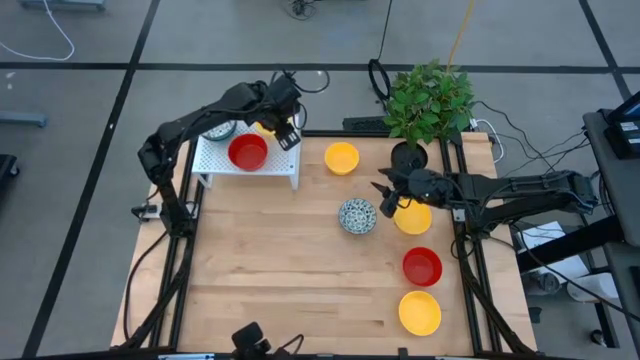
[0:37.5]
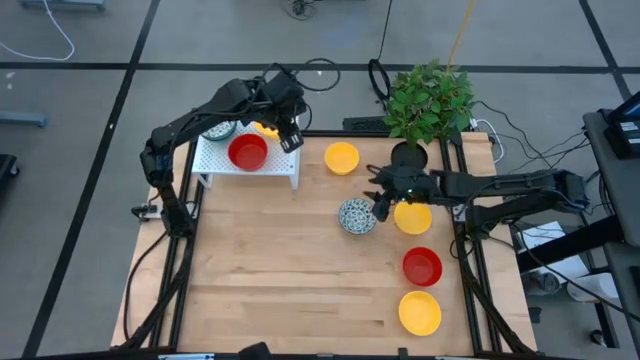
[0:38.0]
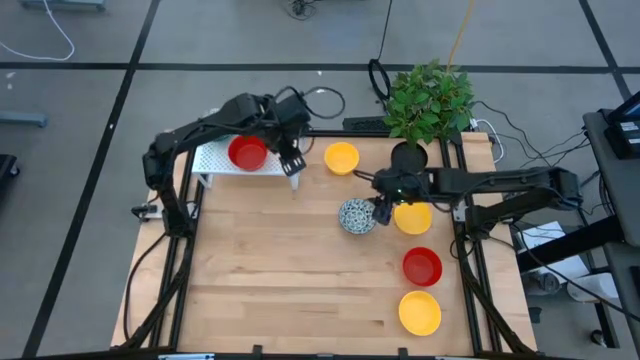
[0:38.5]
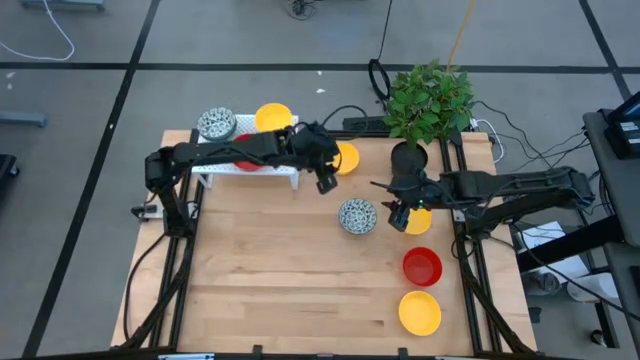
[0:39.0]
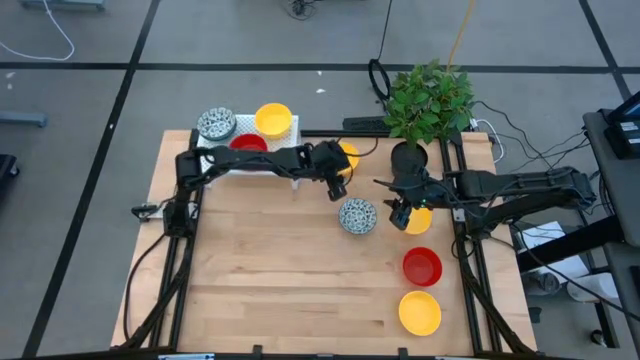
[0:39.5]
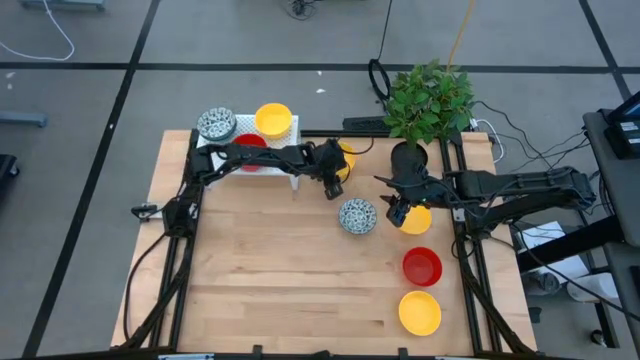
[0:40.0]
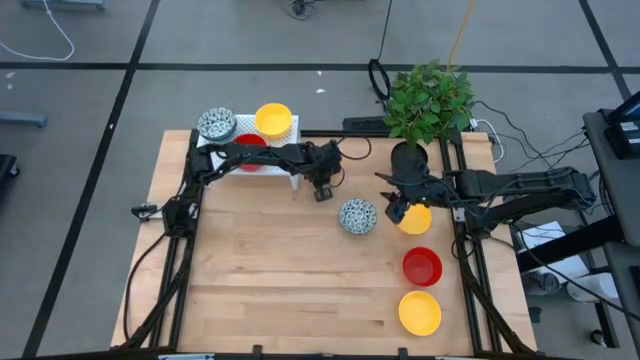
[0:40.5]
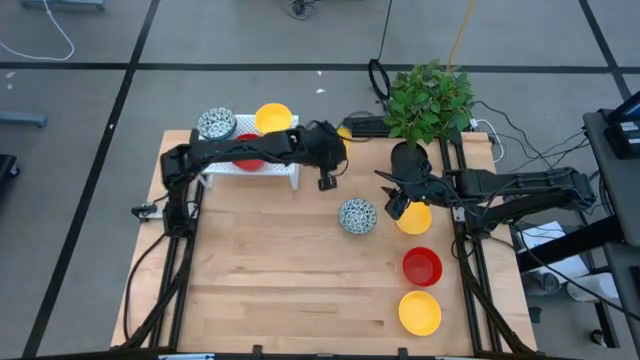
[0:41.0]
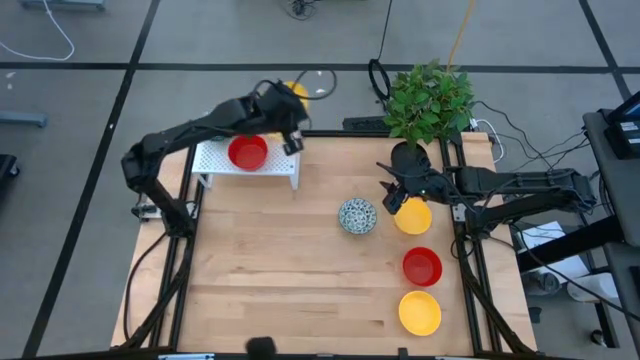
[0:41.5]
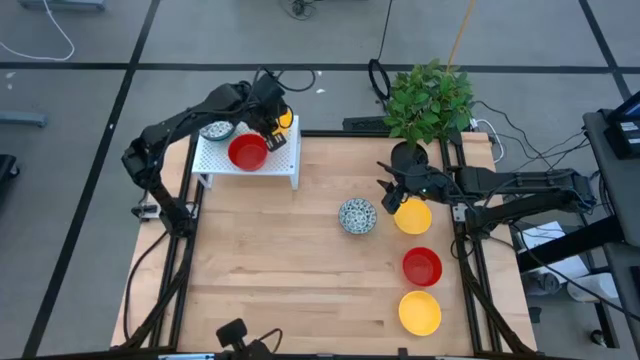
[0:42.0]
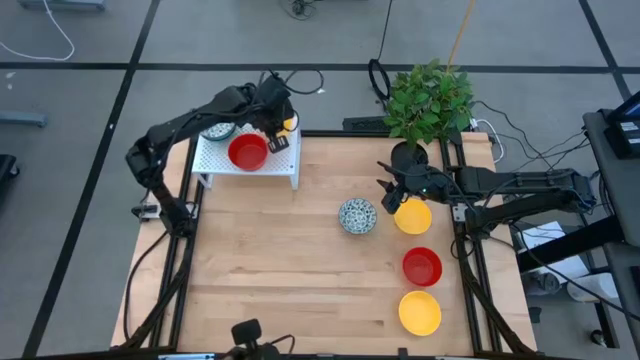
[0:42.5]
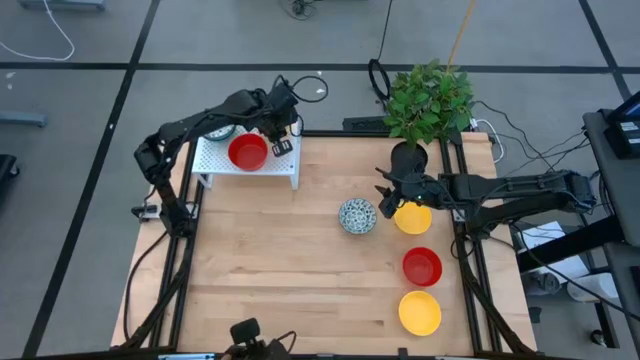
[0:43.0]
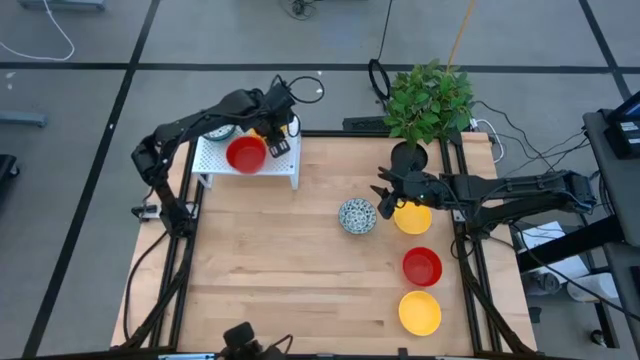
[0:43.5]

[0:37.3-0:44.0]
Task: Pick & Place Mini bowls
Stack the yellow bowl on top of the yellow bowl on the shelf

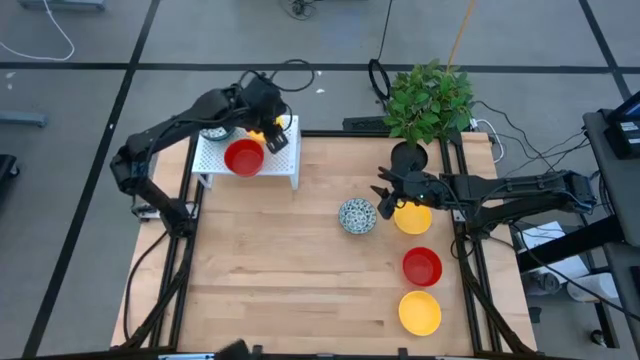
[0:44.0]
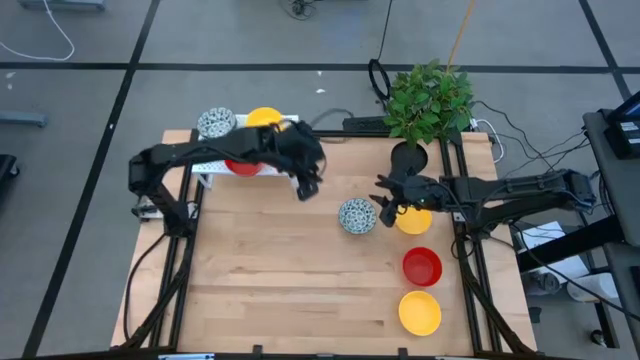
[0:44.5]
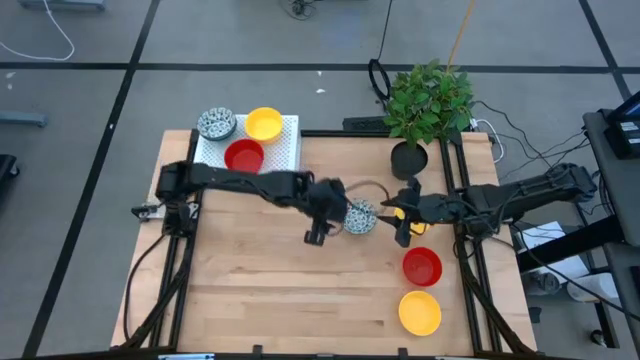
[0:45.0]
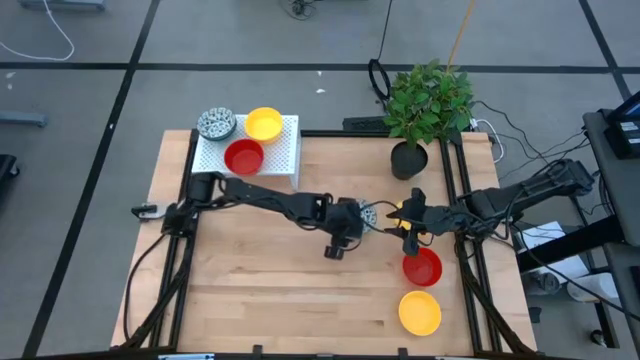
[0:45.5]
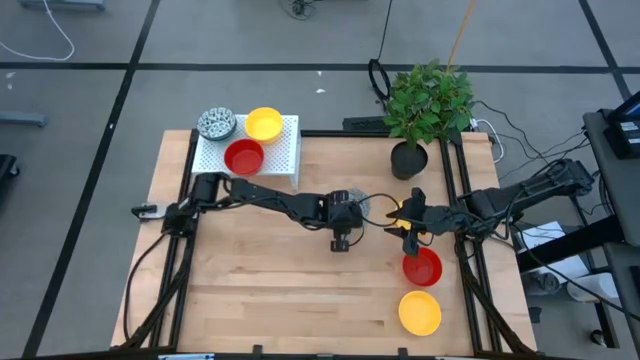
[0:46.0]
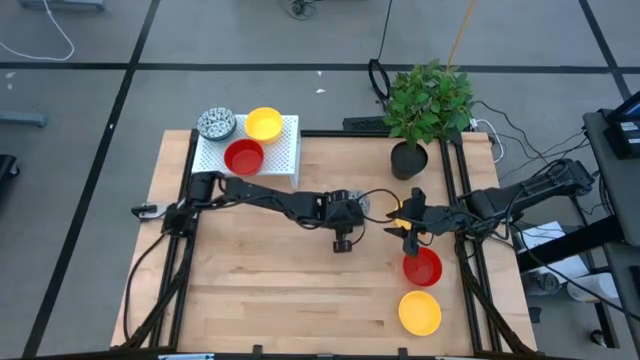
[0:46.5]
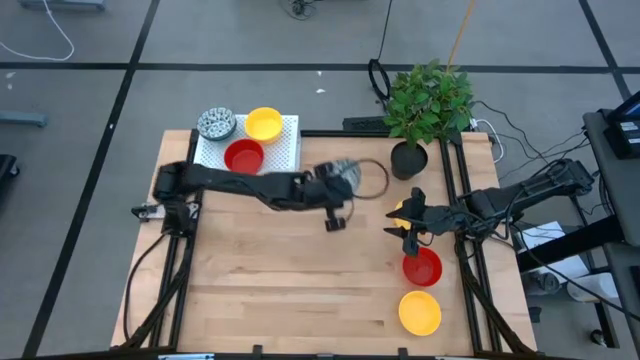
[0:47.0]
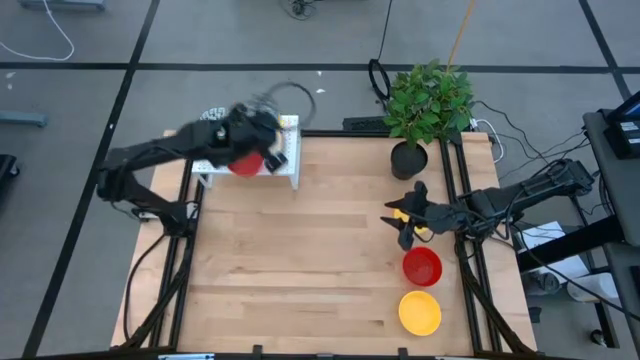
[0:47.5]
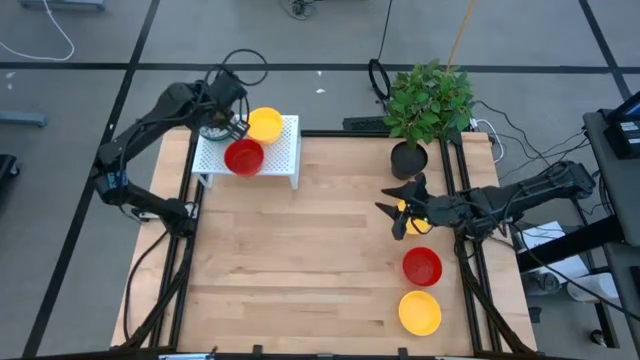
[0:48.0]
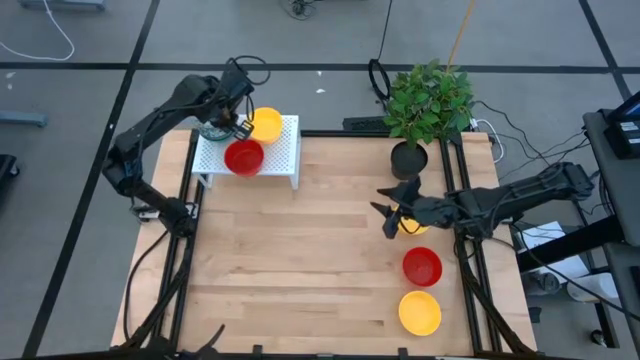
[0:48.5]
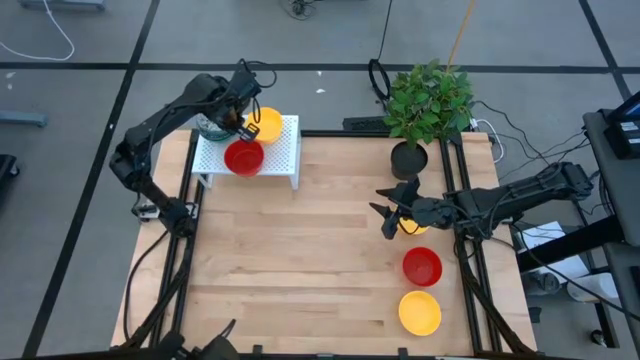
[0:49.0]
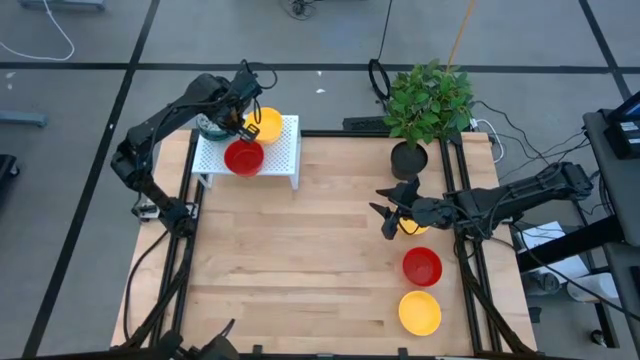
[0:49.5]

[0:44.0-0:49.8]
Stack the blue patterned bowl on top of the blue patterned bowl on the shelf

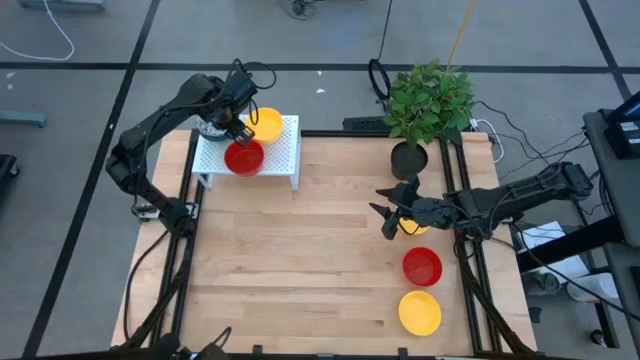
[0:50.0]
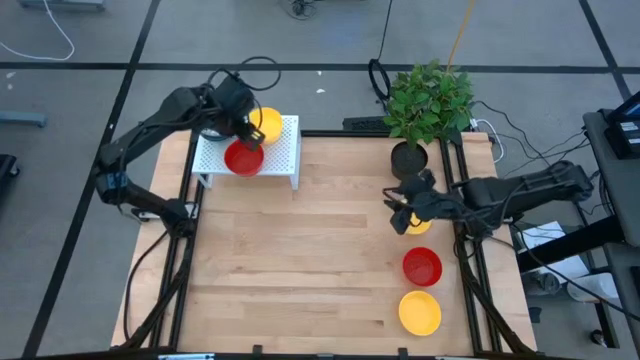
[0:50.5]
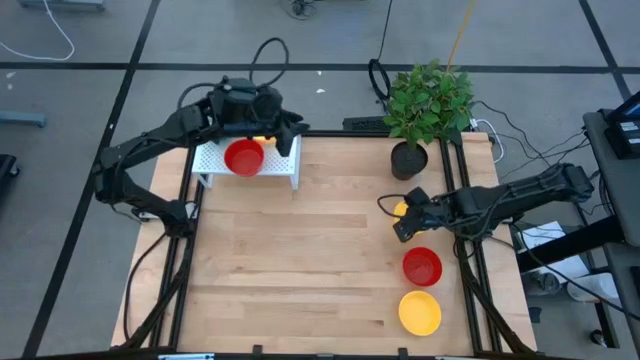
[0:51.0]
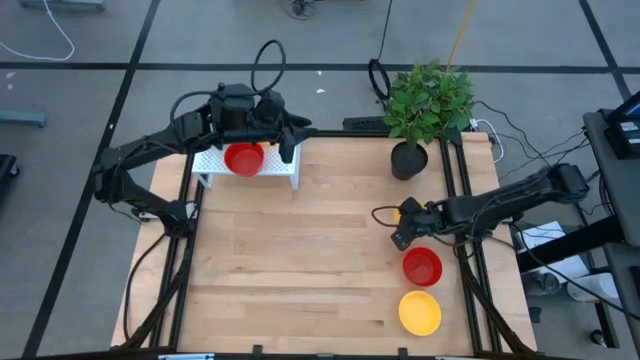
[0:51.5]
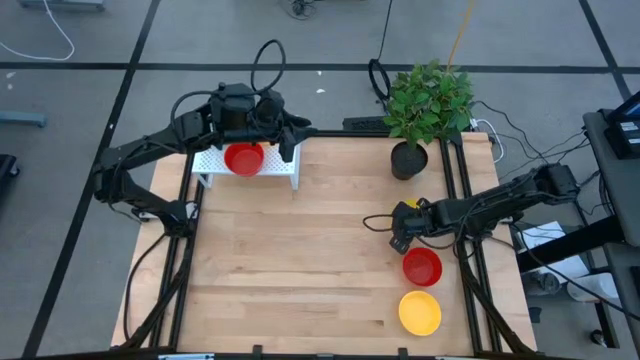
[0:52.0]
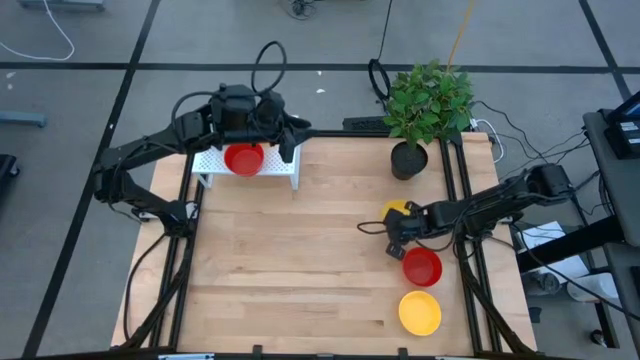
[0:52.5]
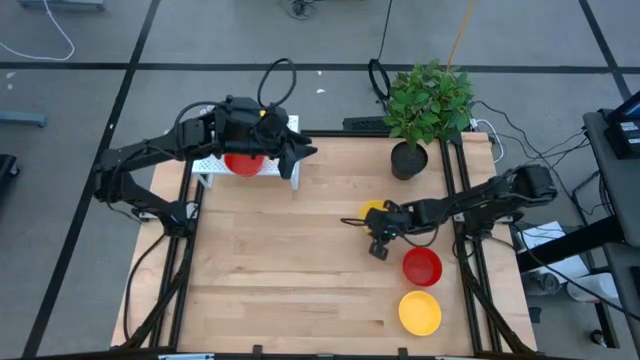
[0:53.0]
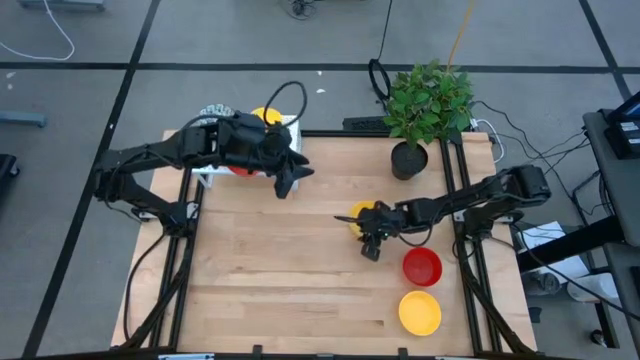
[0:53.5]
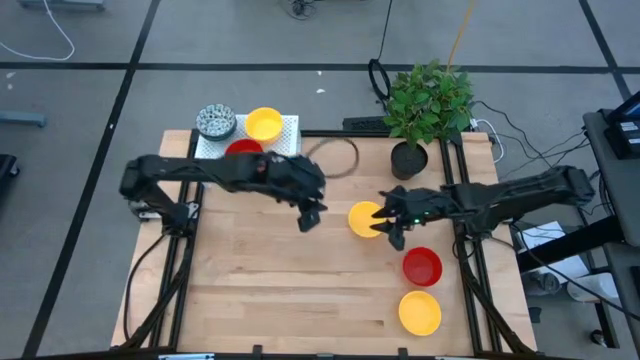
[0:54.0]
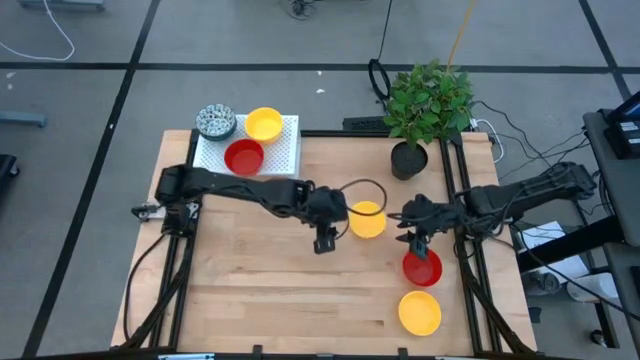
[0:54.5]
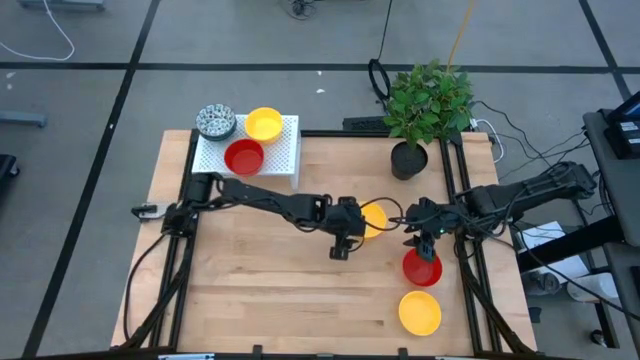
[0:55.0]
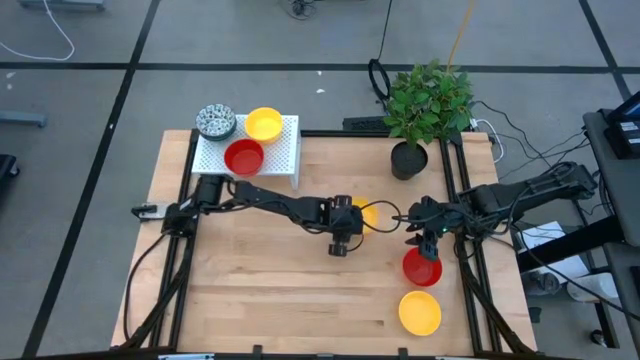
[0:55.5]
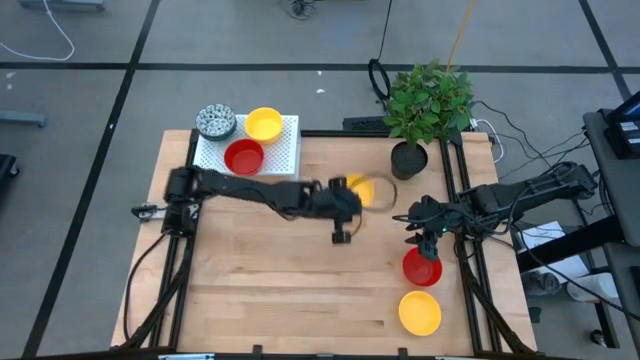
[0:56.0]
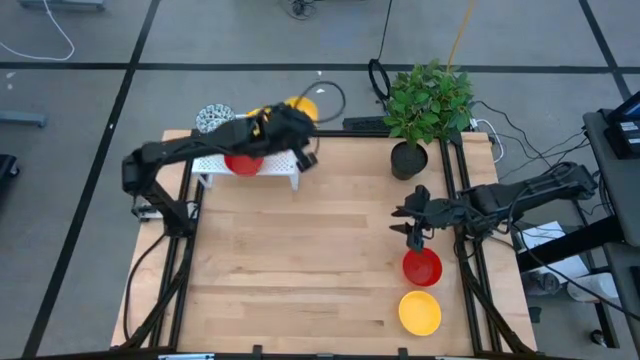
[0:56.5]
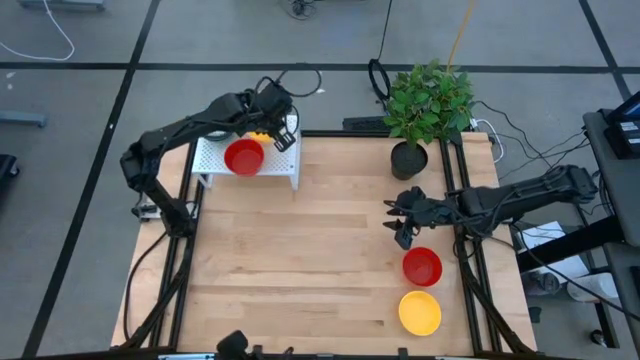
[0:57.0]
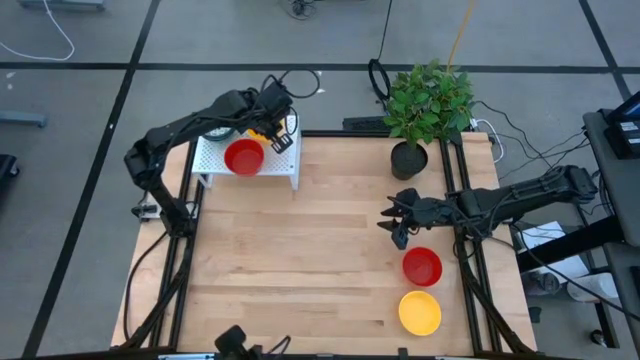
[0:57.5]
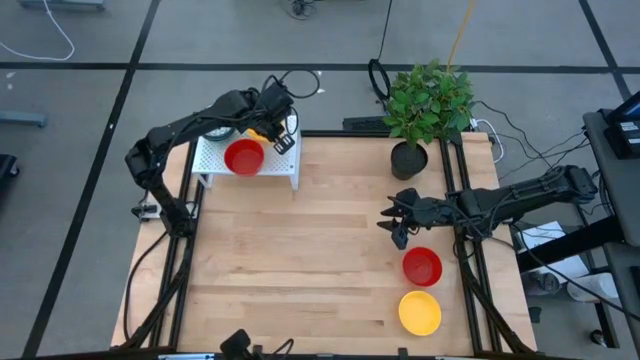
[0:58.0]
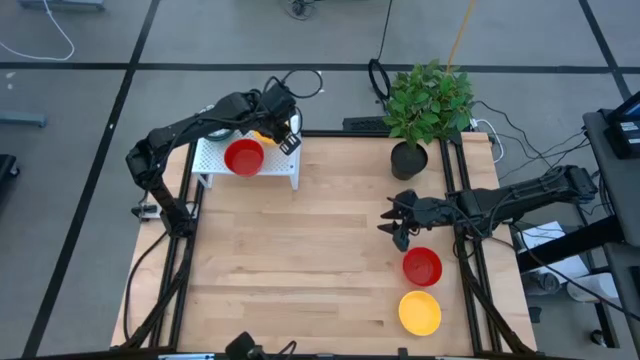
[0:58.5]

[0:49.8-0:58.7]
Stack the yellow bowl on top of the yellow bowl on the shelf
